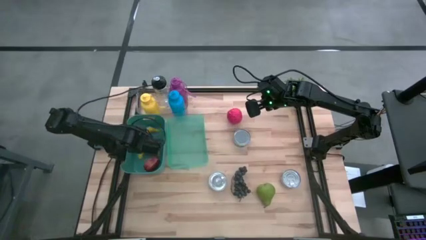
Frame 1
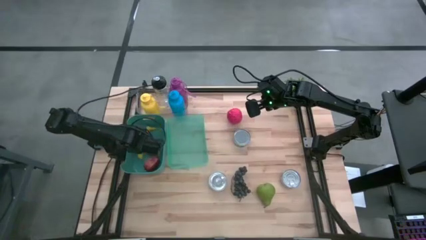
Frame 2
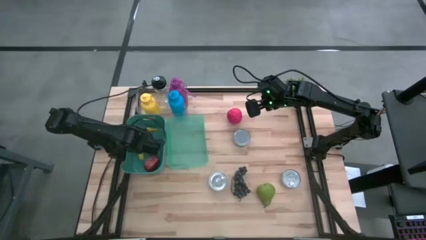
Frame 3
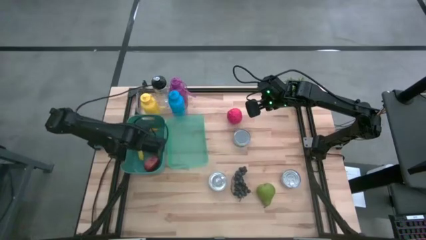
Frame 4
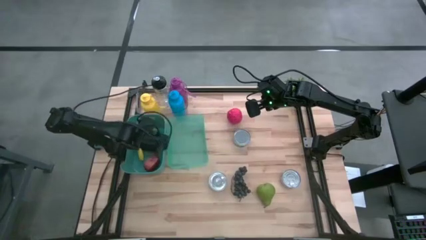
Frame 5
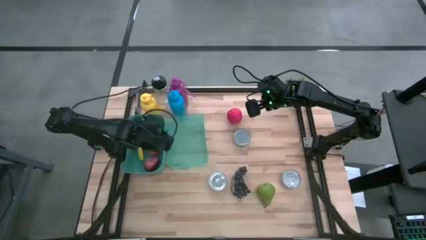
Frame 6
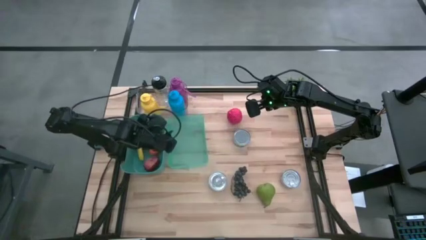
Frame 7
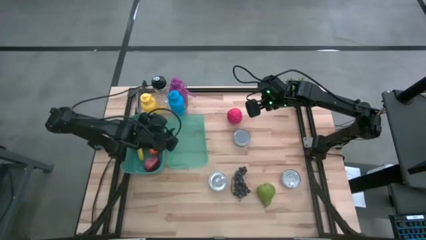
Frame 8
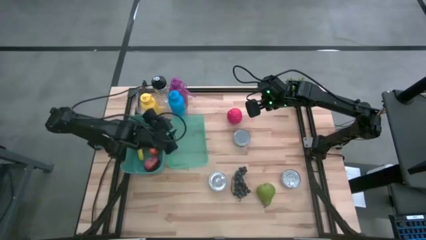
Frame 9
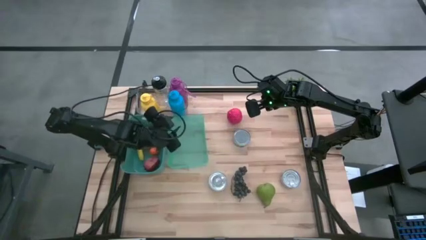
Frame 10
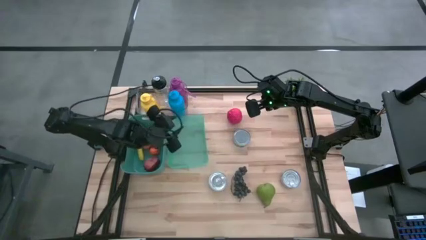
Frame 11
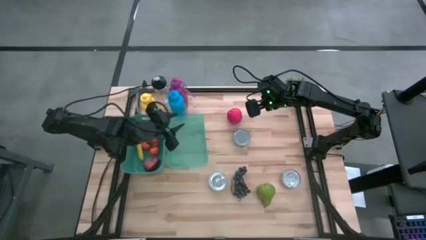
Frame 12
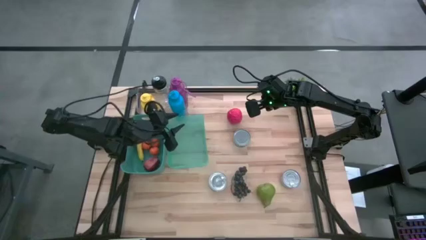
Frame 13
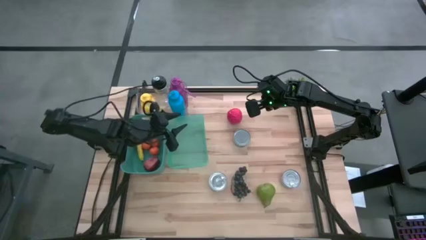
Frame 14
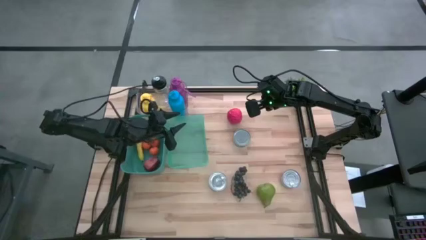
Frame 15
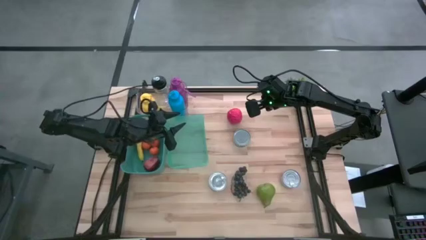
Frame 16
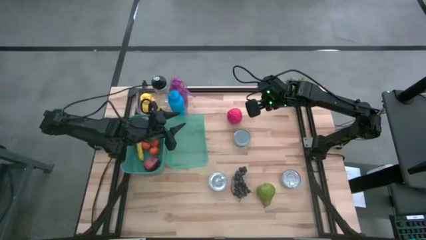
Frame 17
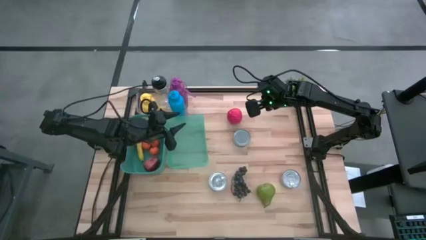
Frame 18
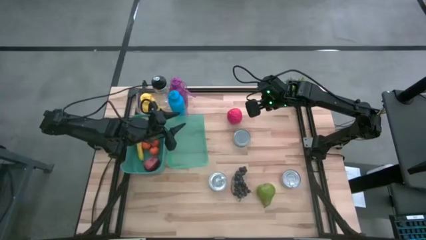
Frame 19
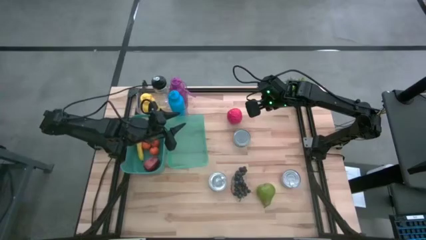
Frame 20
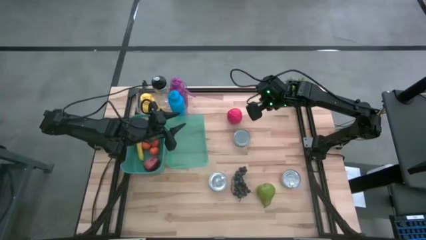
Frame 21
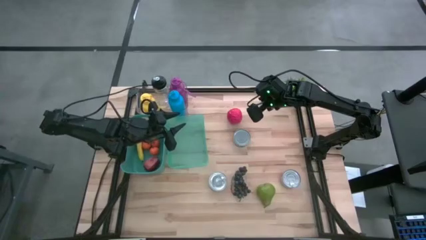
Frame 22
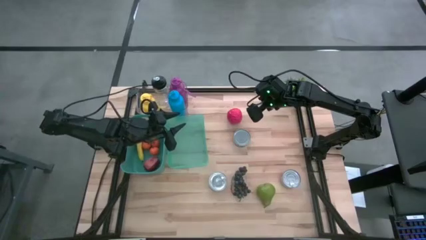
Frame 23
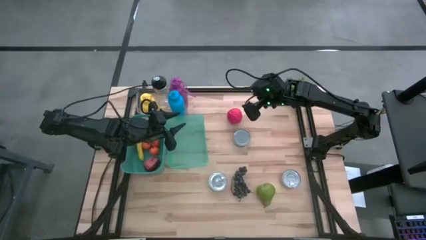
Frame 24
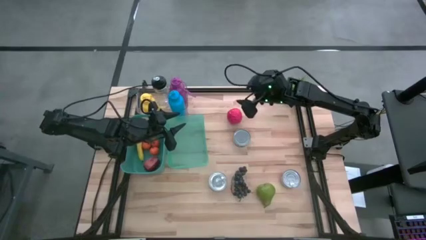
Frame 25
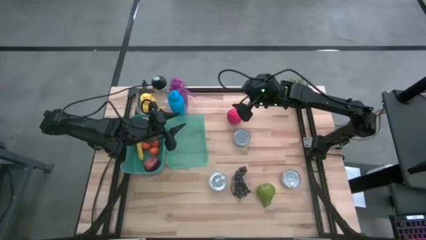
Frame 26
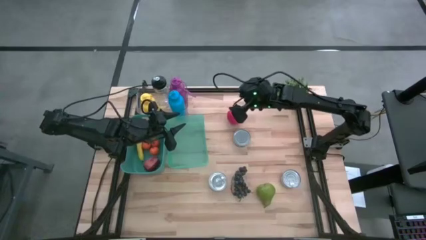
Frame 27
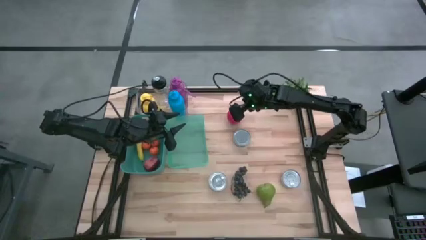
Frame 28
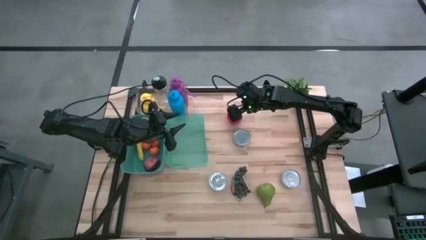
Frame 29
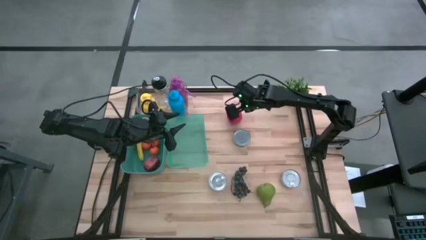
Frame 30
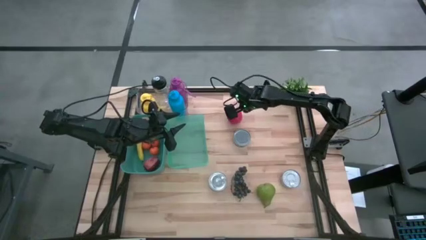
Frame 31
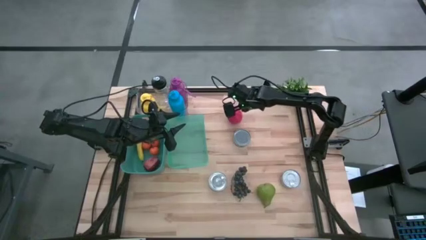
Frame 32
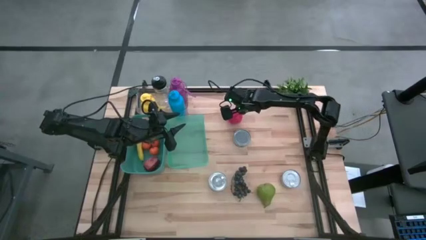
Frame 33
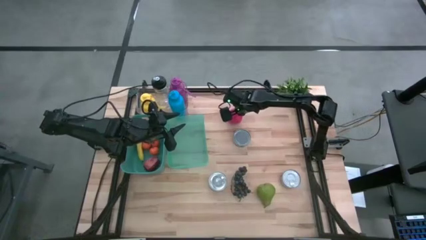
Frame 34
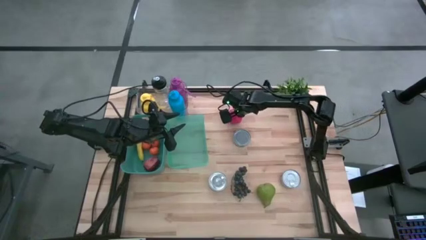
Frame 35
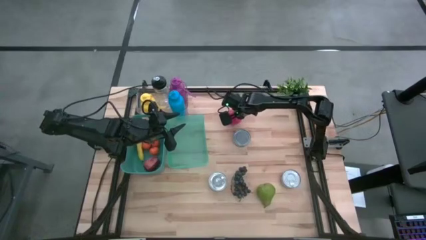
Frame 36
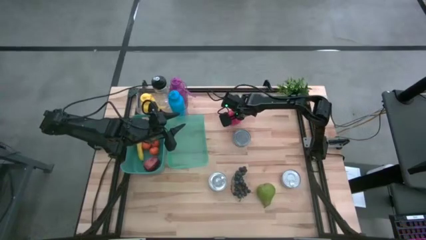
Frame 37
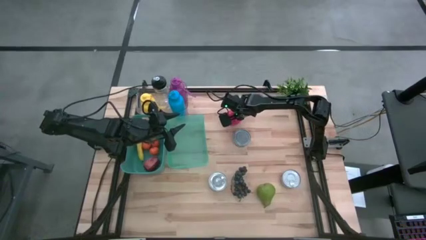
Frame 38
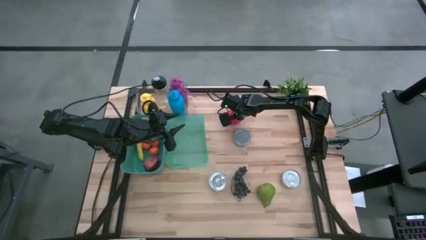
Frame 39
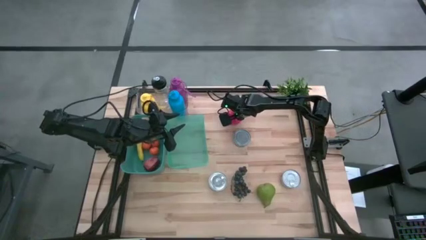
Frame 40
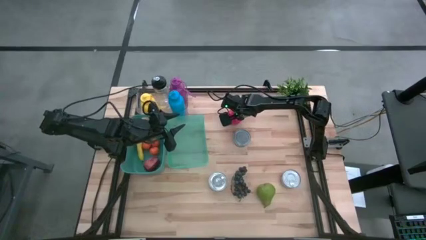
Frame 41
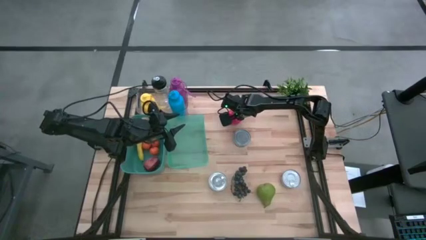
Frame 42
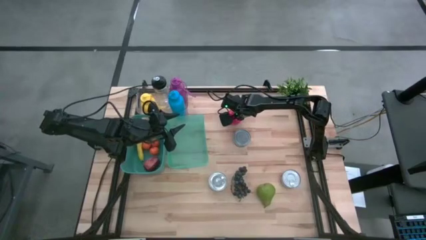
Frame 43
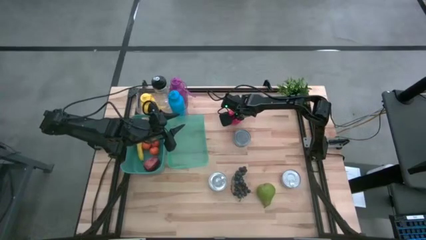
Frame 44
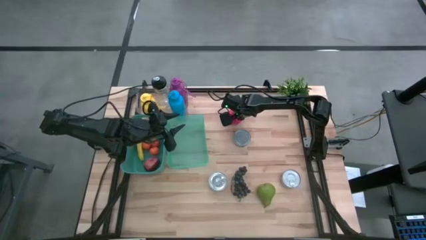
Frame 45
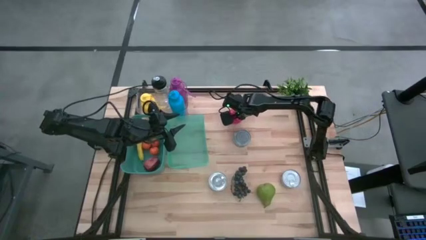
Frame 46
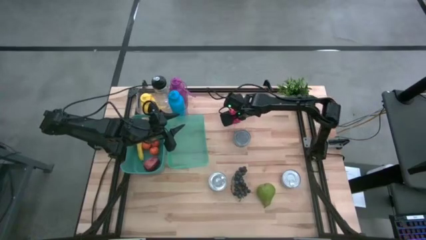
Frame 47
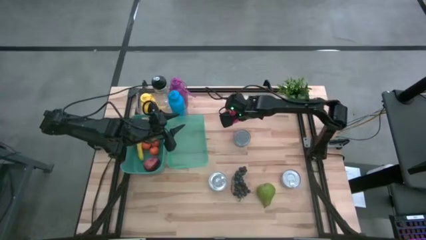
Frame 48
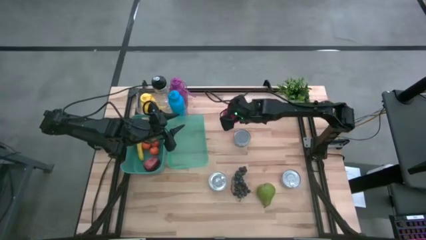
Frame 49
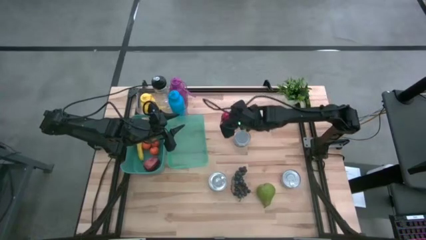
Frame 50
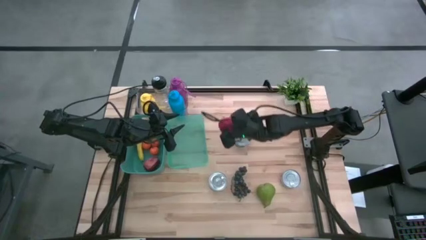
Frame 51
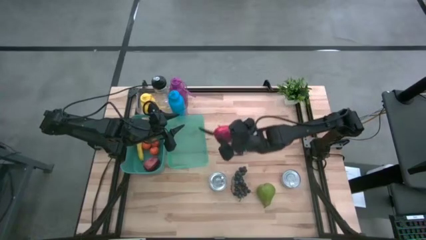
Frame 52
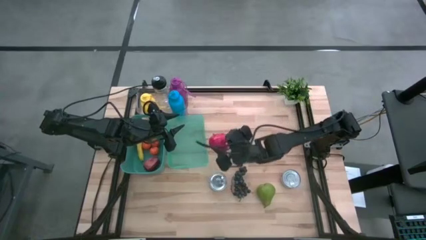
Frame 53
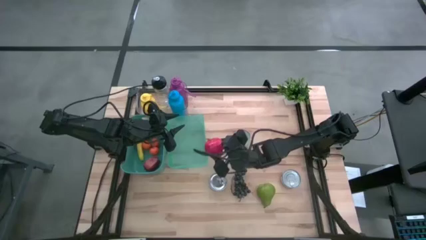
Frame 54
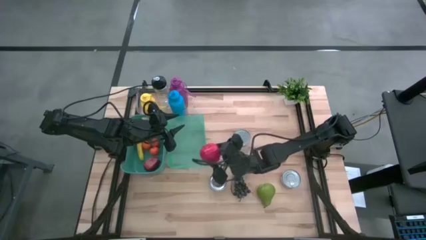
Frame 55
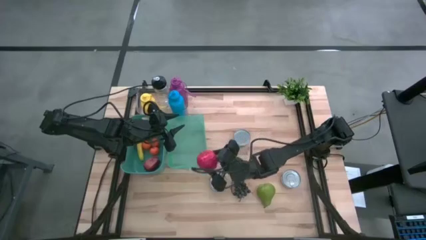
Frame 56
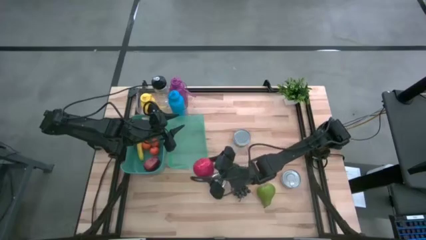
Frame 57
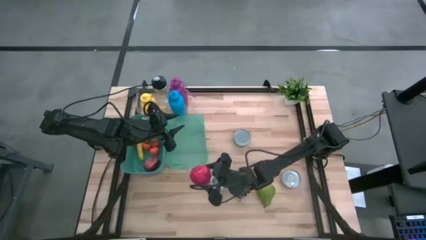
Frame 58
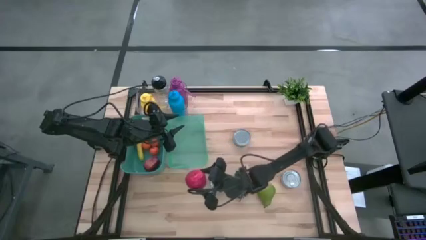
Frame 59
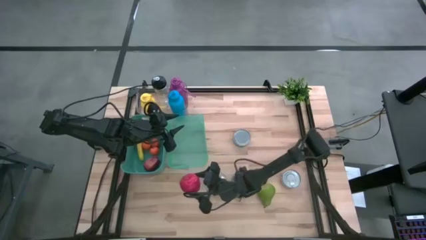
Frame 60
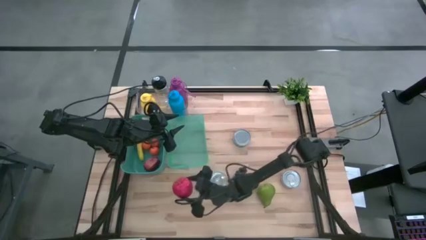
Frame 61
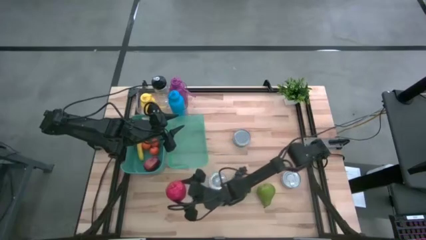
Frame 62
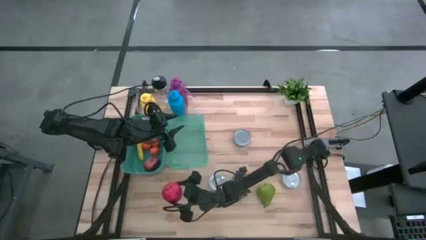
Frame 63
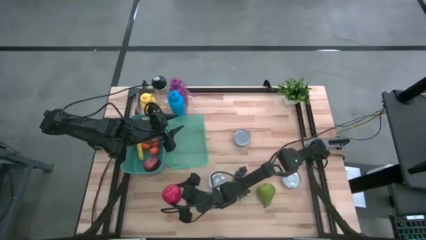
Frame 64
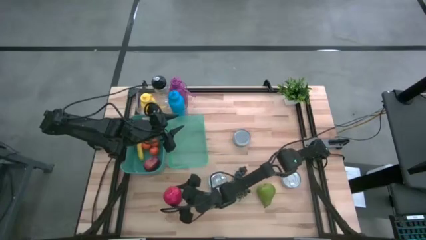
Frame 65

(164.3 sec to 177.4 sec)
Task: Pick & Place Food Item
Put the red apple into the green bin
